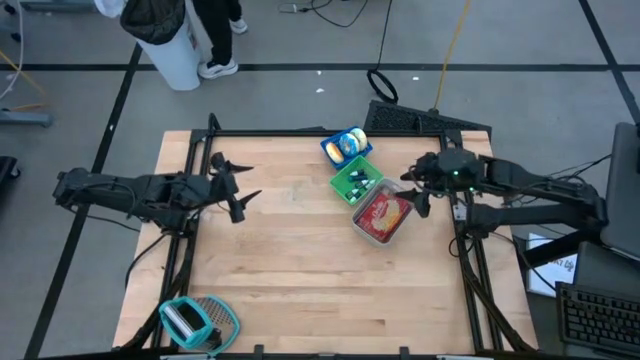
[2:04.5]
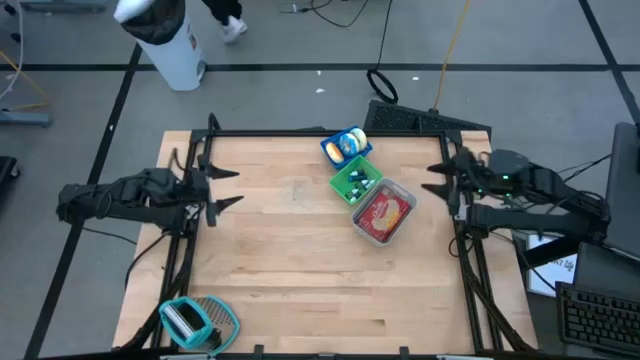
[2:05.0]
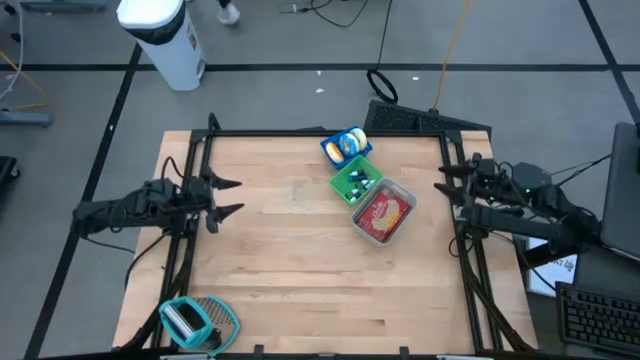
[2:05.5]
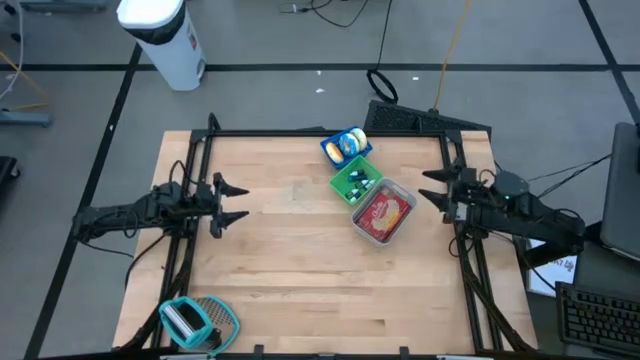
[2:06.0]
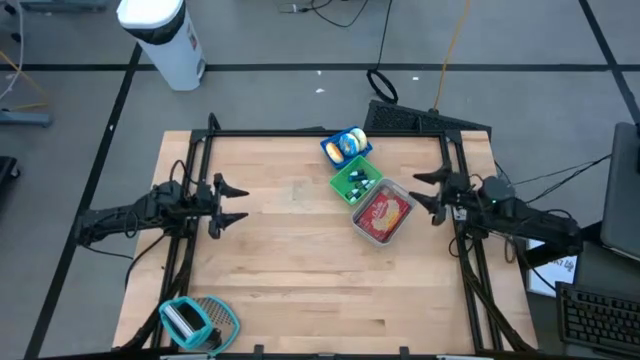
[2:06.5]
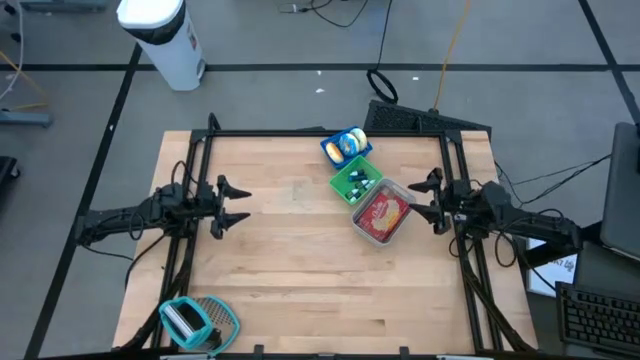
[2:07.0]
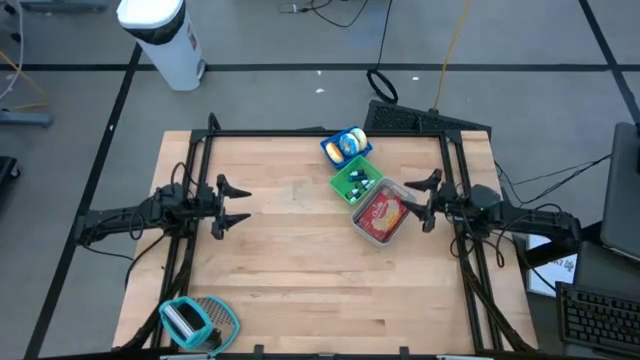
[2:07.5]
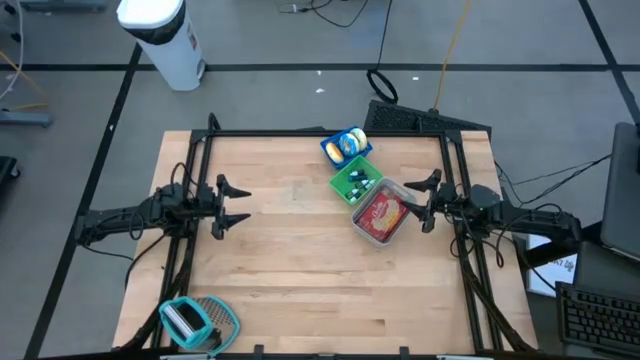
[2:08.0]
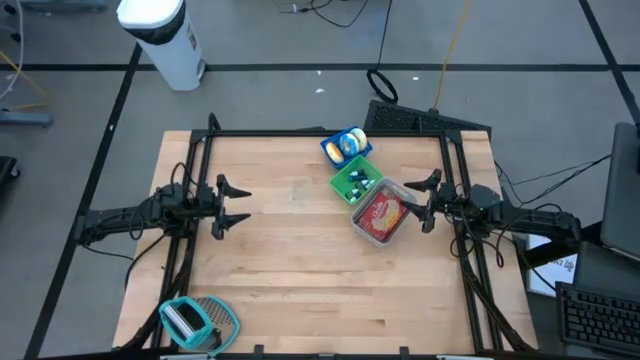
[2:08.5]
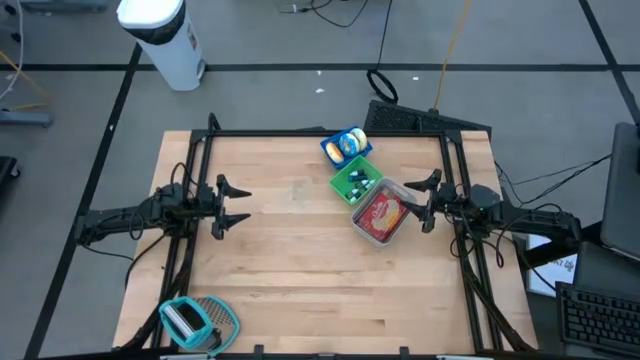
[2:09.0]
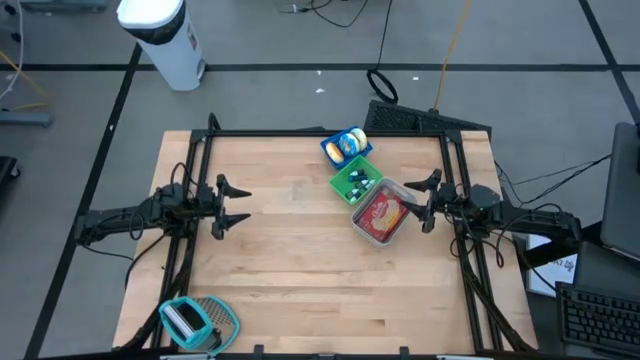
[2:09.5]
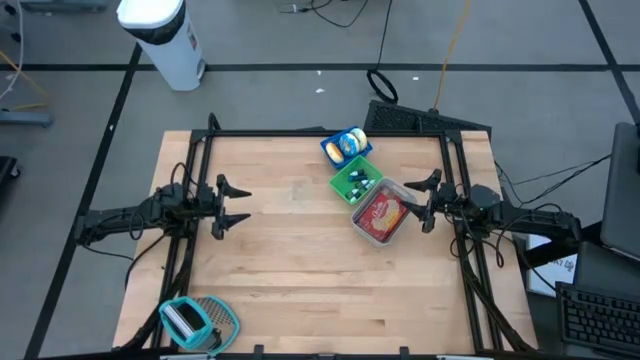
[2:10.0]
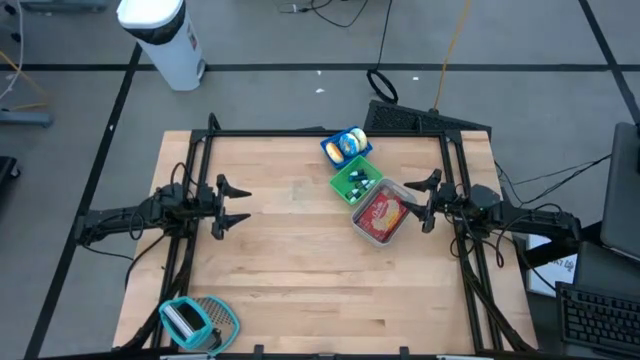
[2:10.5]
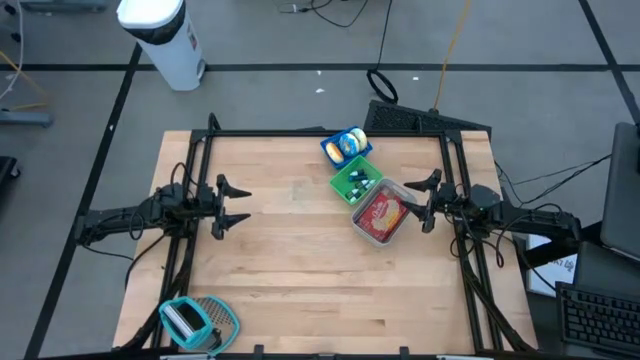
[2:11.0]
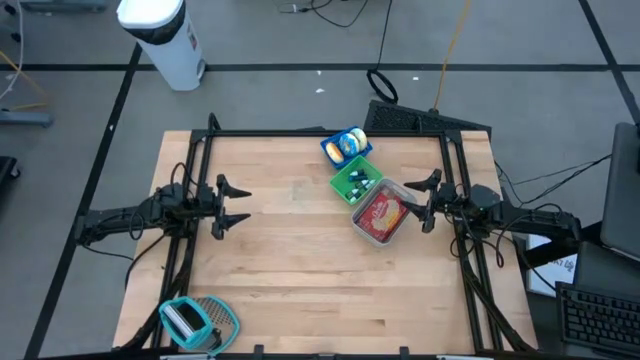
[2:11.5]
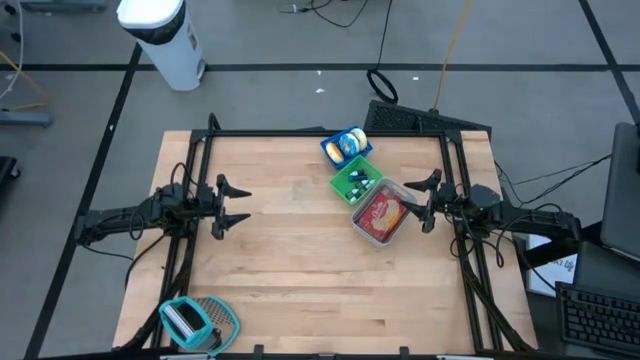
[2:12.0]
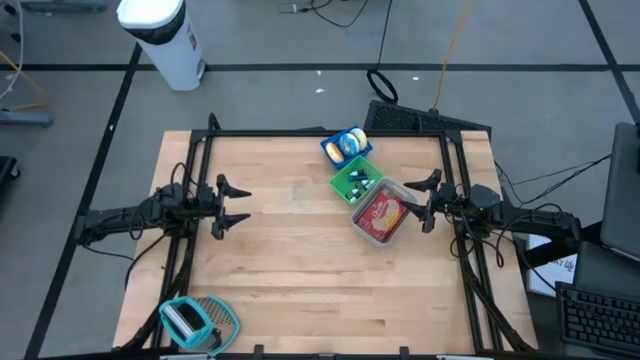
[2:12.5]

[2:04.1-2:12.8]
Return to home position

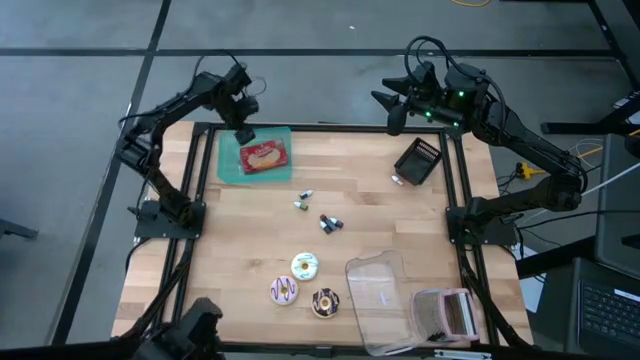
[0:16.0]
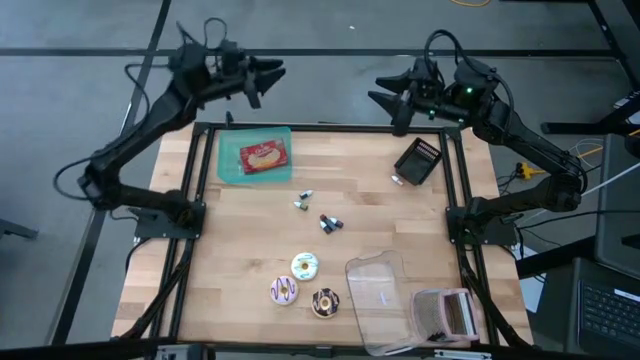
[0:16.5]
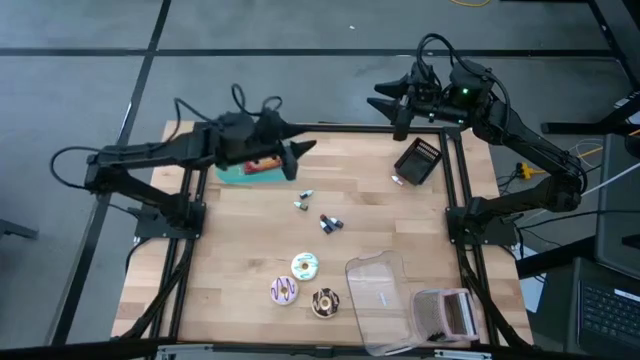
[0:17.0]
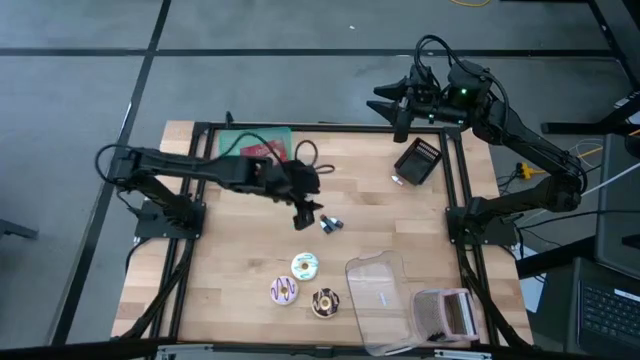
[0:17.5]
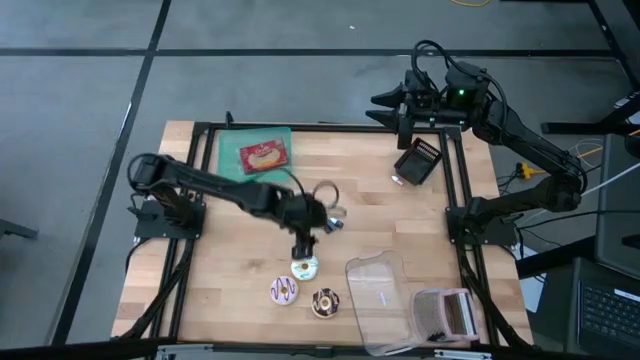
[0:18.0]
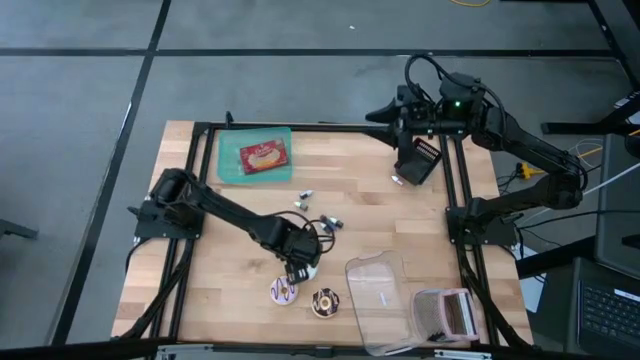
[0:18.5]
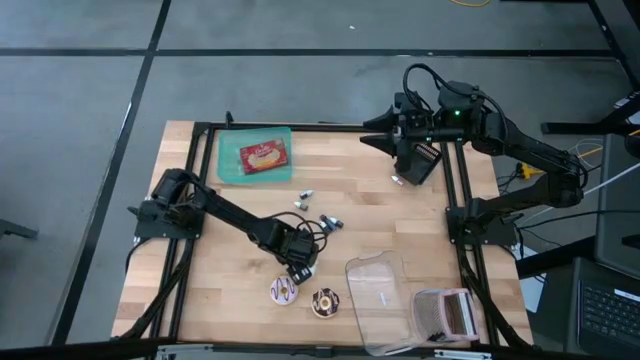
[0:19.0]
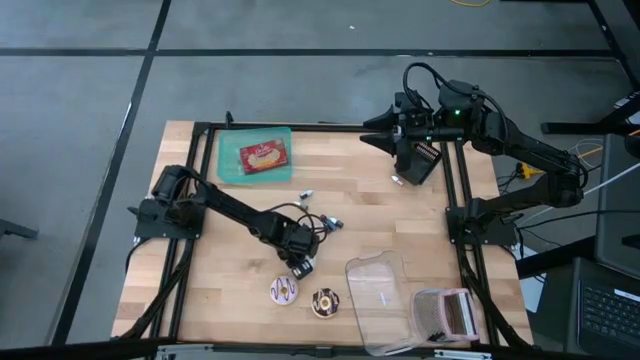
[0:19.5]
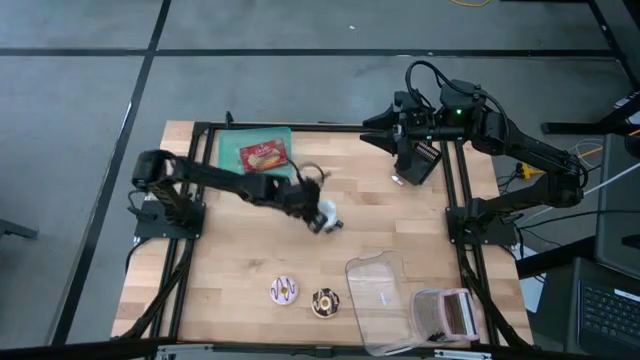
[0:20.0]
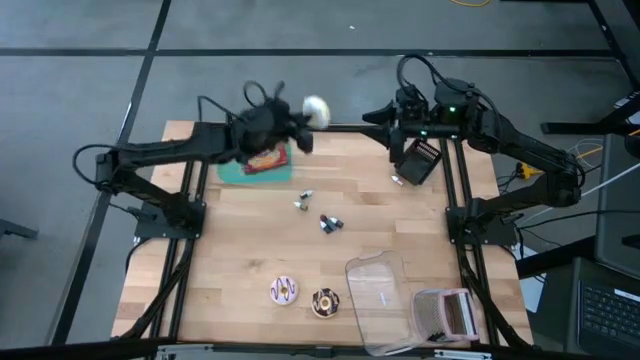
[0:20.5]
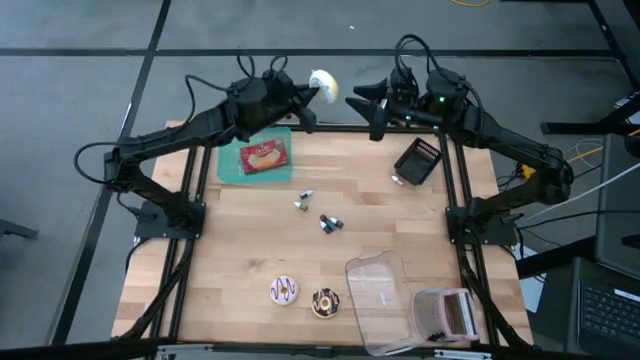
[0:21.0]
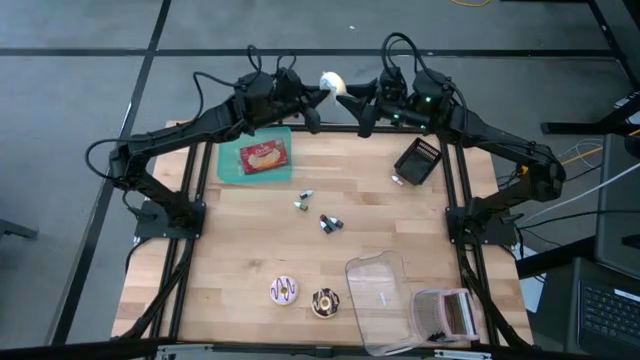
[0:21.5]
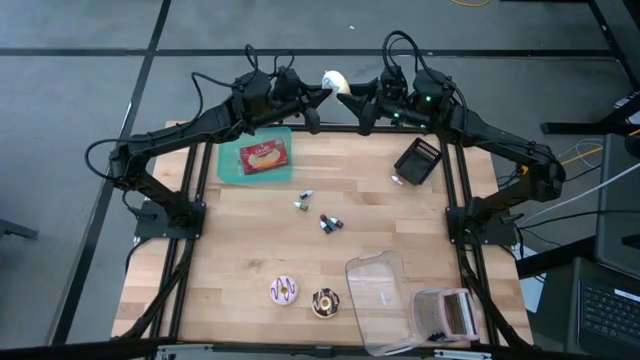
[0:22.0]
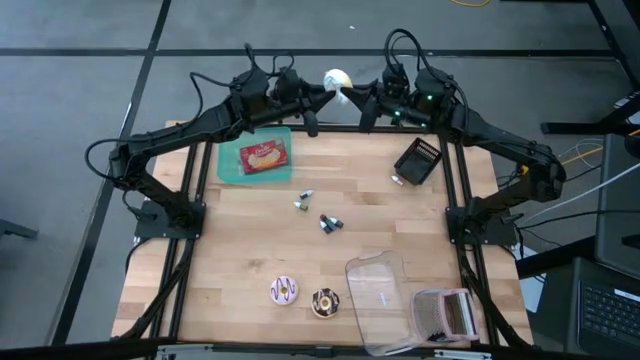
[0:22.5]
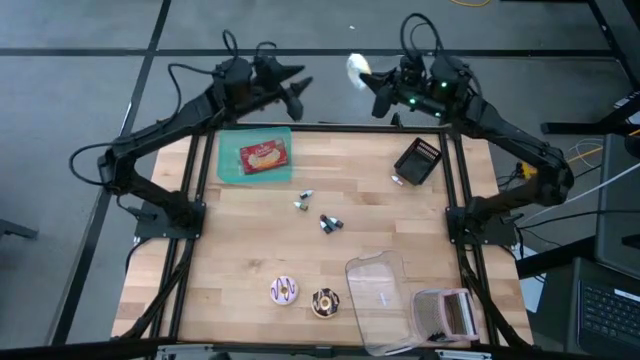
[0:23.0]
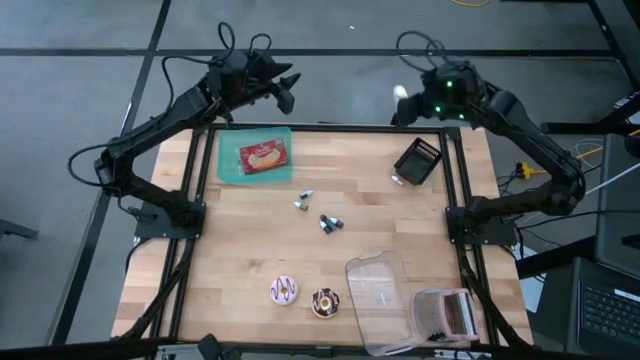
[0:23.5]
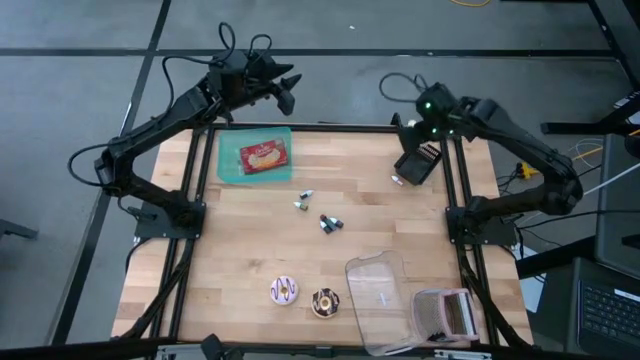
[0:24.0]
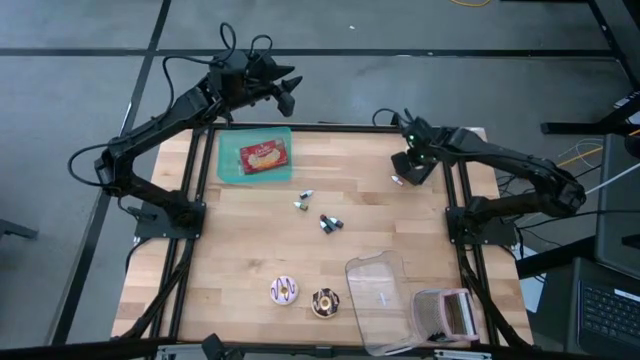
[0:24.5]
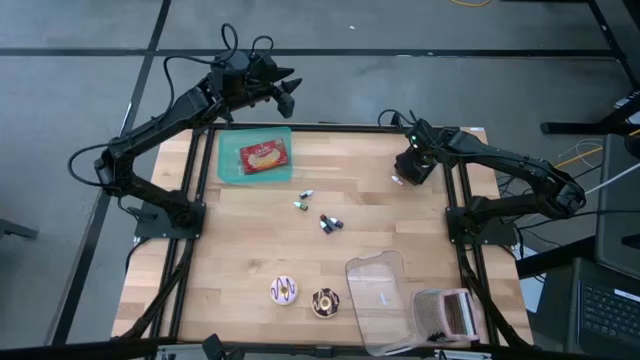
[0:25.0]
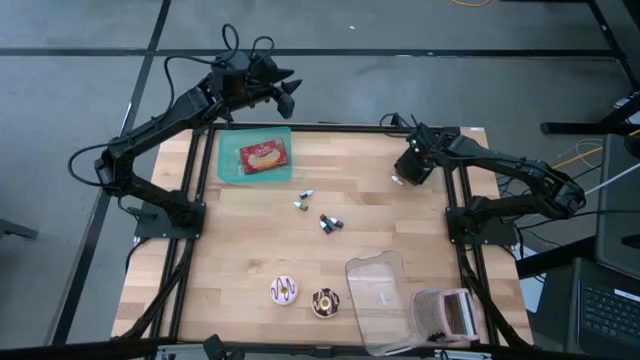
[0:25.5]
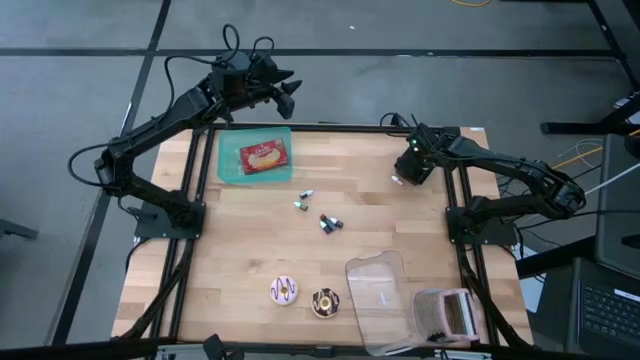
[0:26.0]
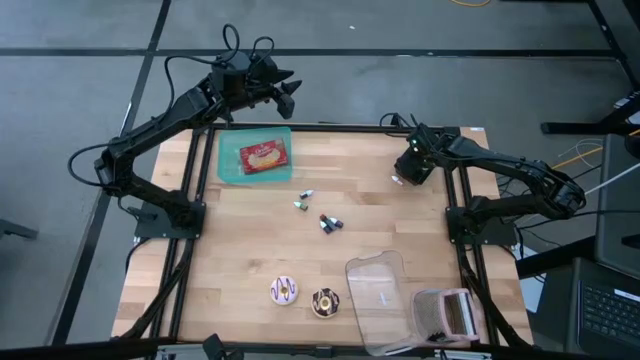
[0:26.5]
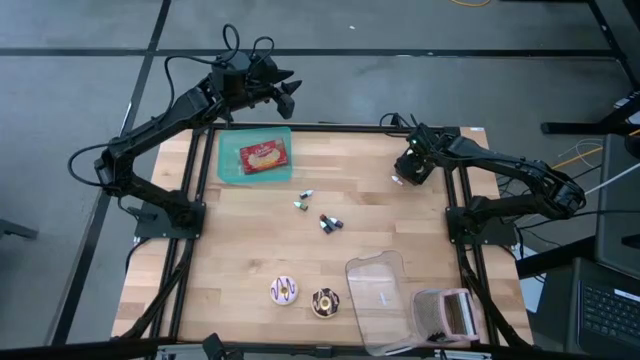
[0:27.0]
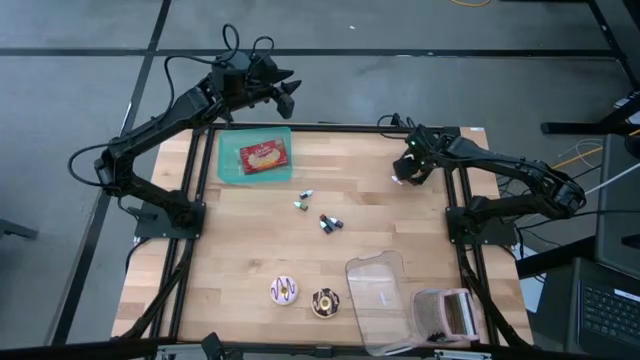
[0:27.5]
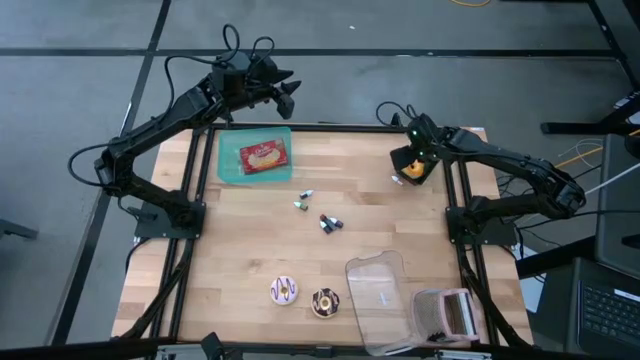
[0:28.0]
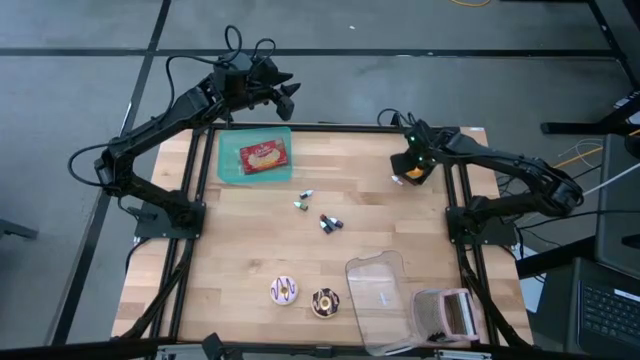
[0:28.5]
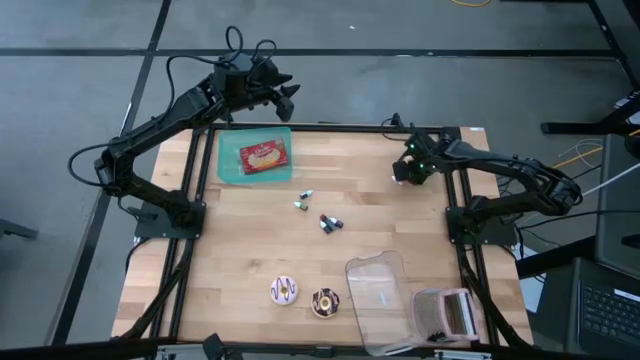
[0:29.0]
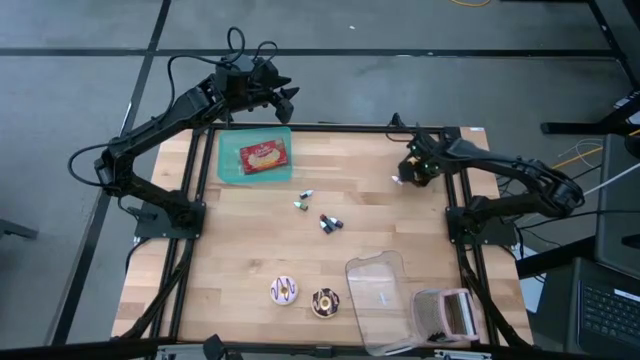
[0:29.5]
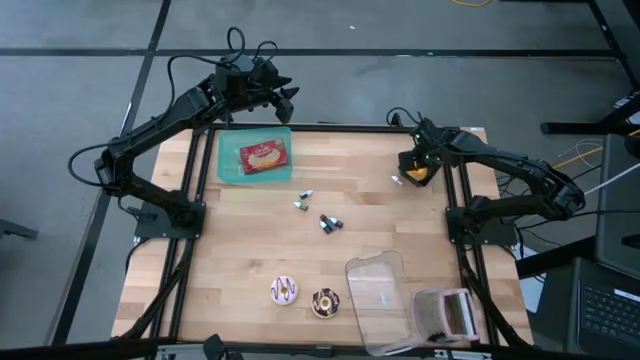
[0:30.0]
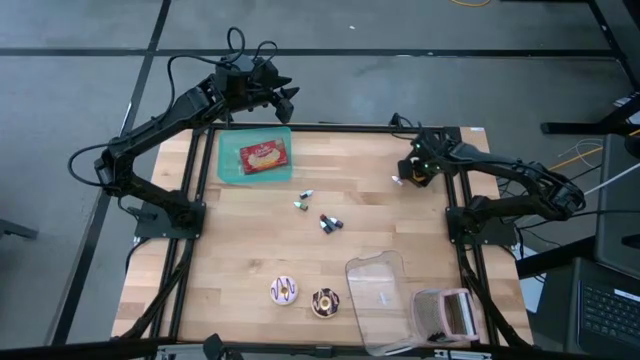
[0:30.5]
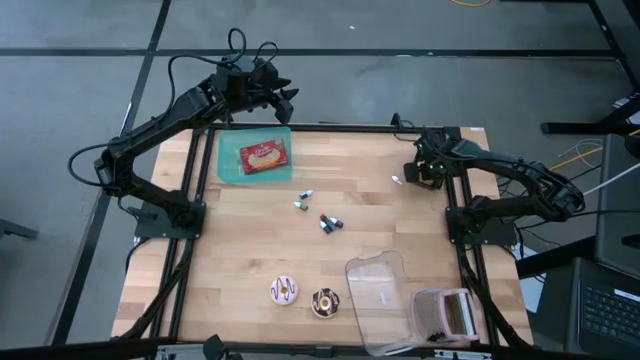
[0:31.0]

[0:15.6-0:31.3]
Put the white donut into the black bin
